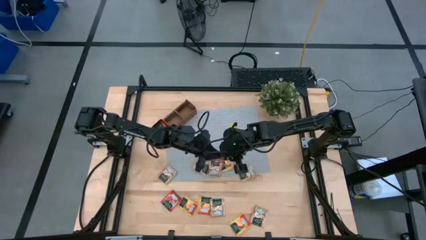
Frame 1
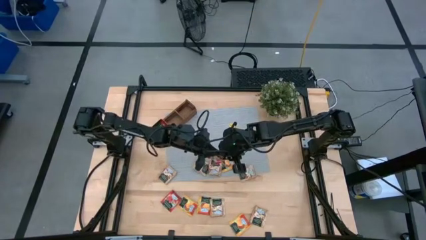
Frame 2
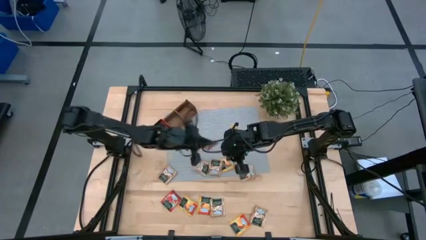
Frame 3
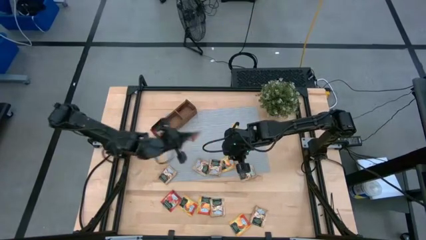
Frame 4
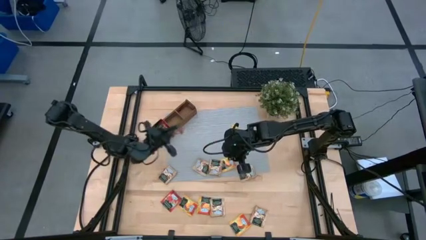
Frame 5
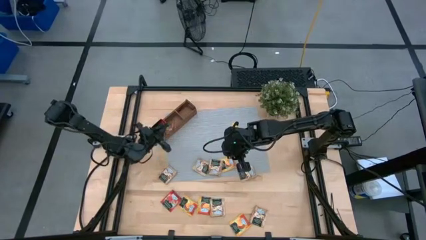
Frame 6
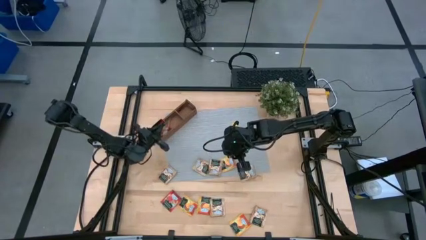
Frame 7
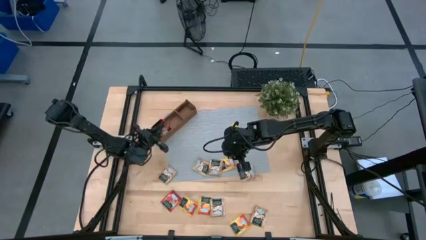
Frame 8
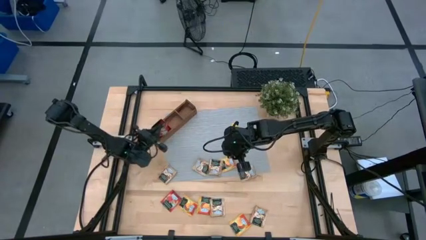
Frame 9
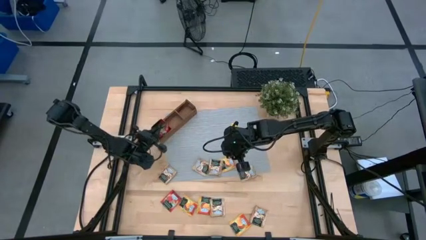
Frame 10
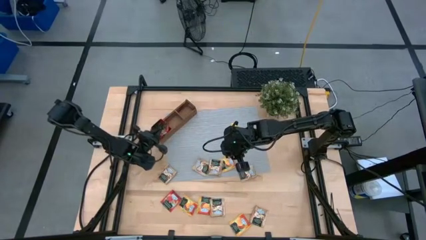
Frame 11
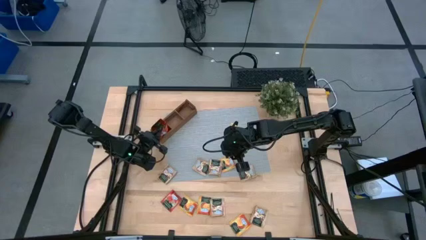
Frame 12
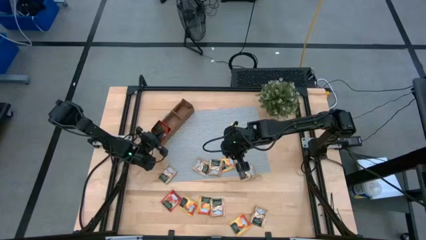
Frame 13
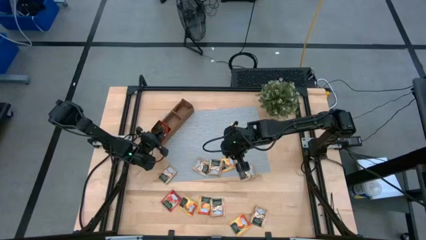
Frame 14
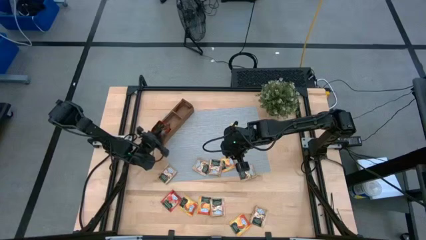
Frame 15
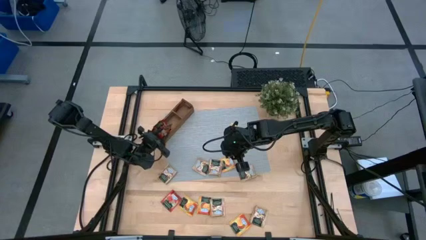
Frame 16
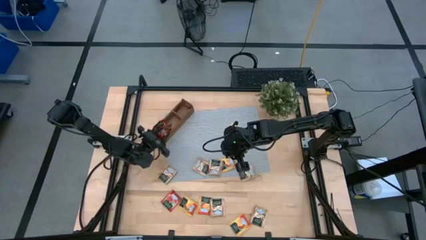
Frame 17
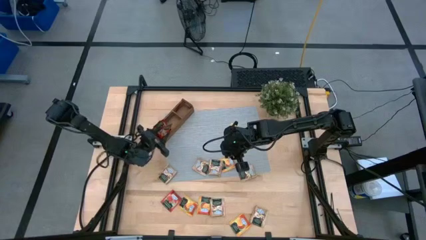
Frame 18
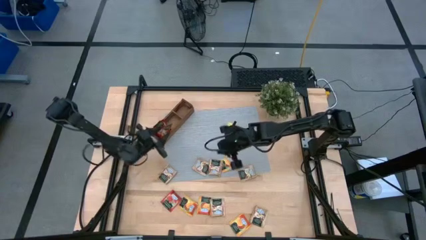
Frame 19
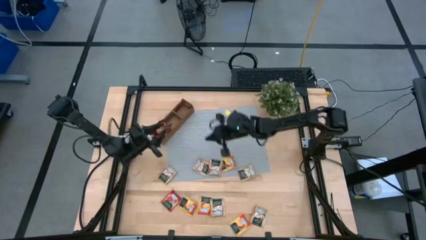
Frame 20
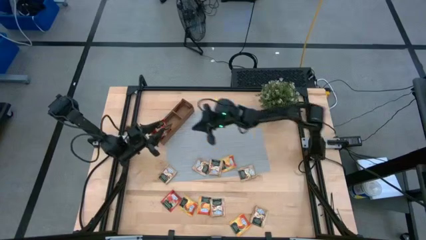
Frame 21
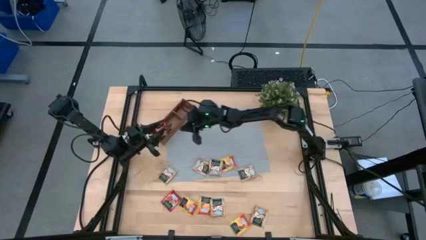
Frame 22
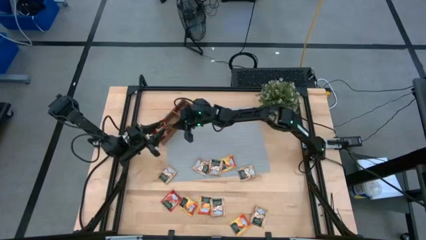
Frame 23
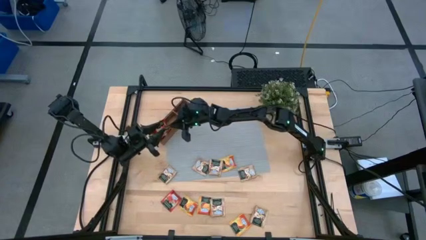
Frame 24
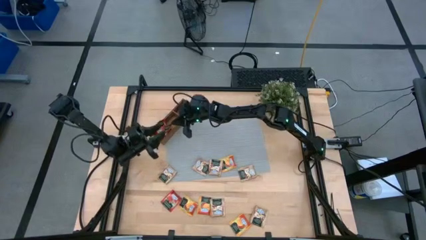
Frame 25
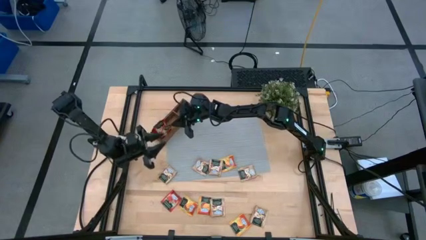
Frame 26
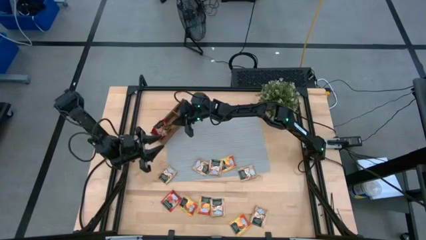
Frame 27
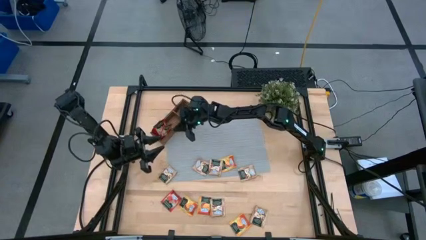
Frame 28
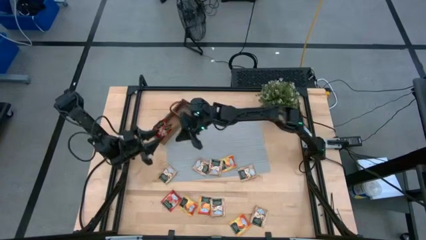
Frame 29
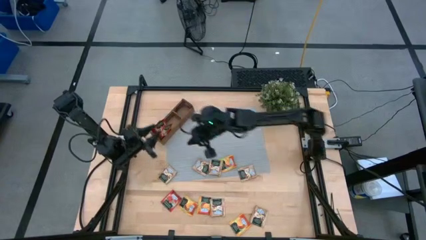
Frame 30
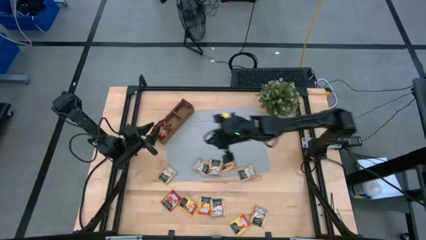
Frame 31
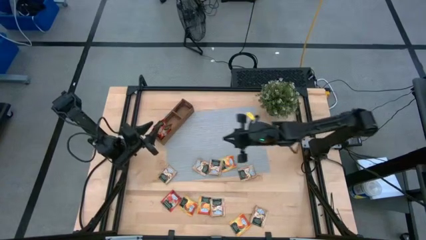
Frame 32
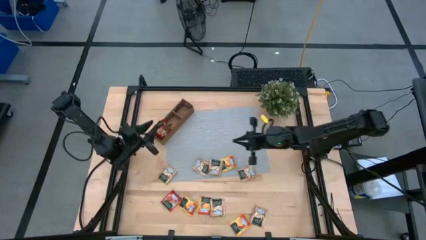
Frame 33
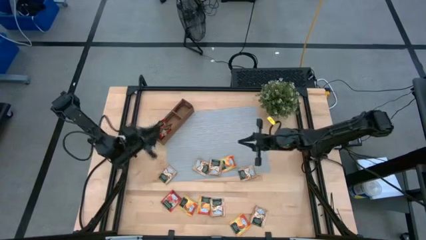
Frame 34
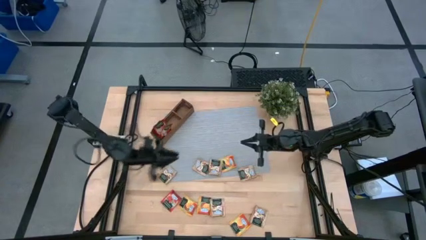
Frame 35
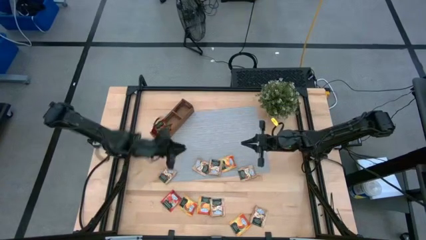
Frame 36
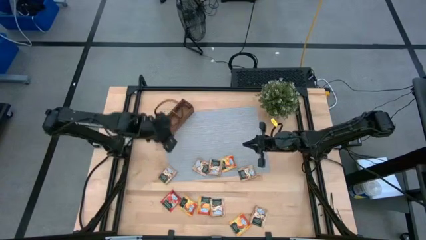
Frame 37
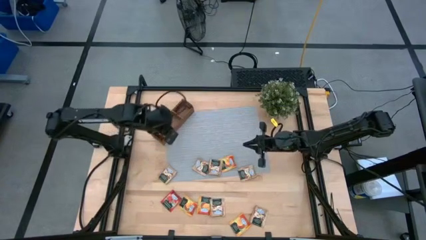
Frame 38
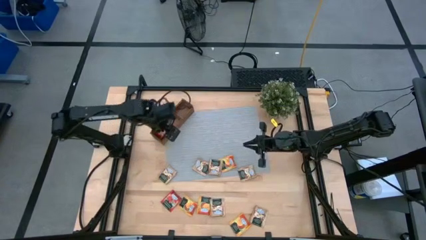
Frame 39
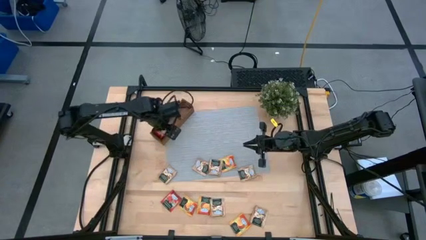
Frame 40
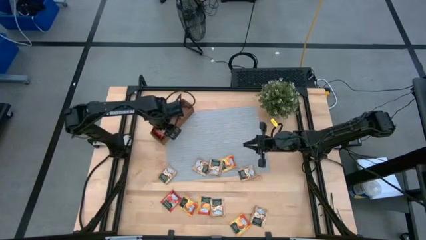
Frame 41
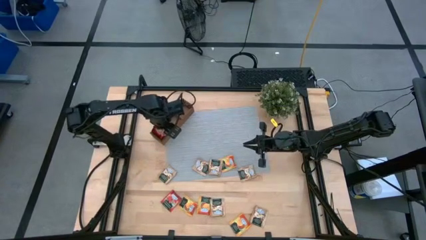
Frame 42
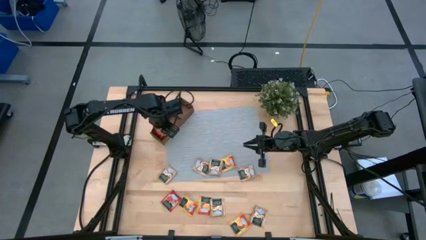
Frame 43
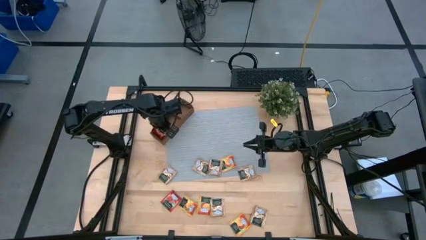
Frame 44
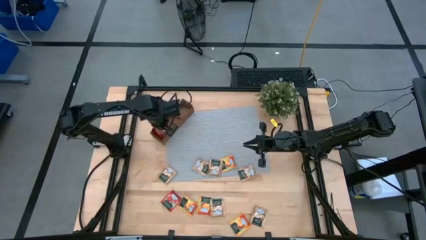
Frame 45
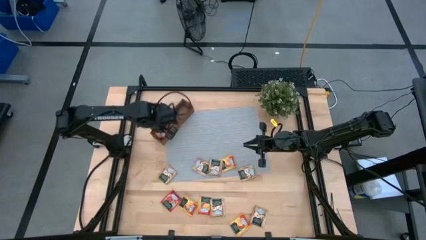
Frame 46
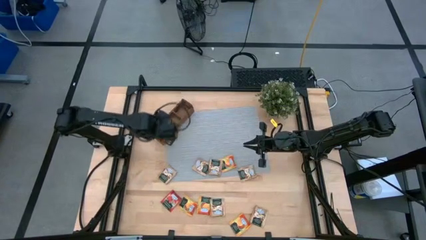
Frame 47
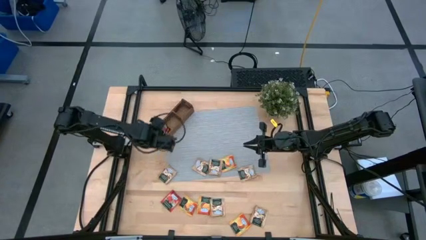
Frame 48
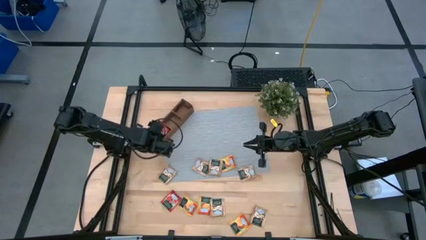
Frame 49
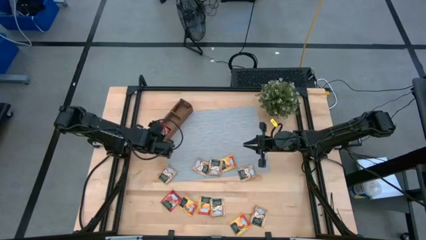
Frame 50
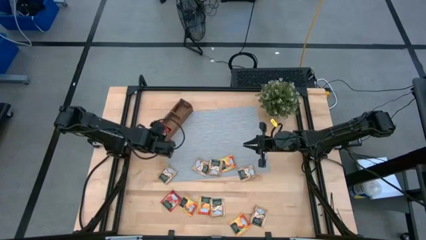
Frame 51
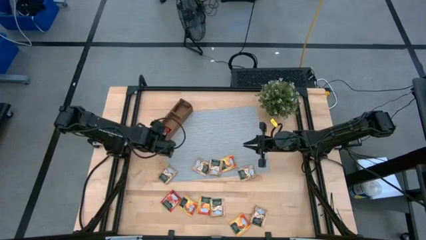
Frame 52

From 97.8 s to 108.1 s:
Task: Pick & Place Tea
Put the red tea bag into the left section of the wooden organizer

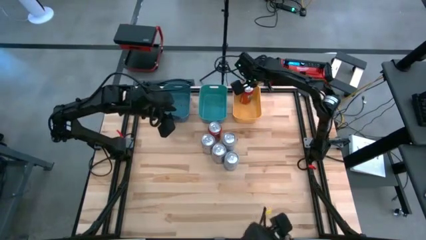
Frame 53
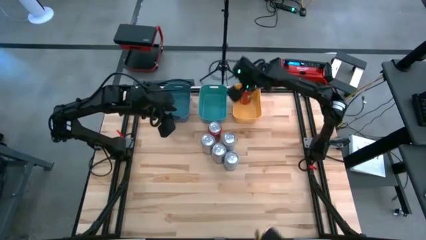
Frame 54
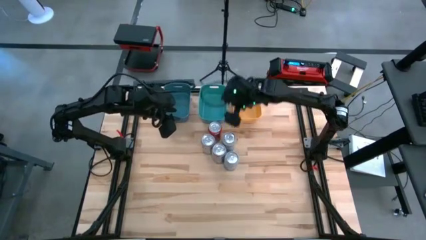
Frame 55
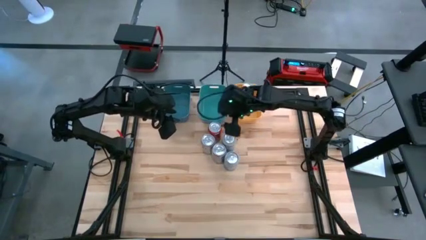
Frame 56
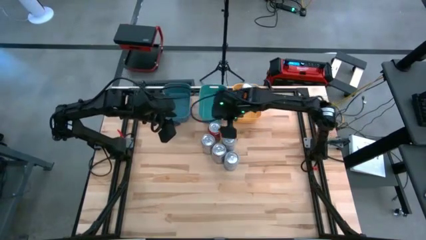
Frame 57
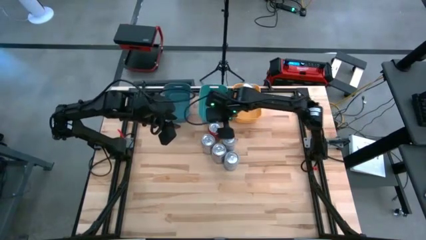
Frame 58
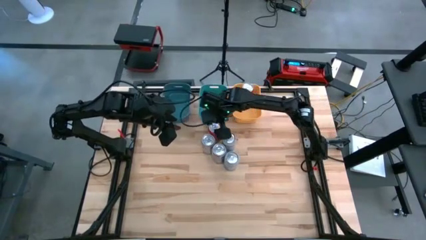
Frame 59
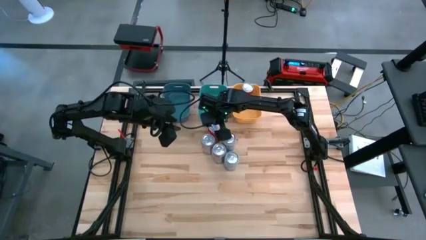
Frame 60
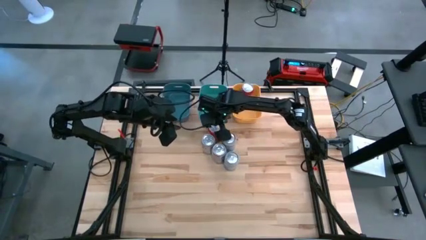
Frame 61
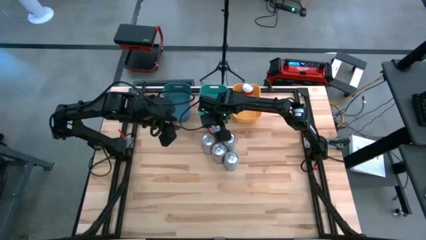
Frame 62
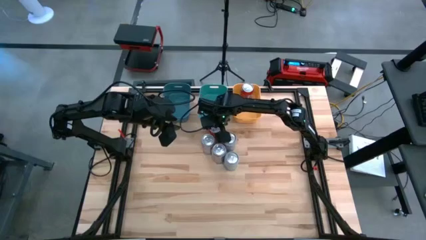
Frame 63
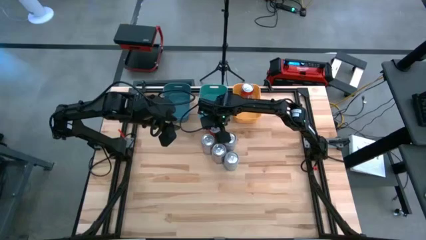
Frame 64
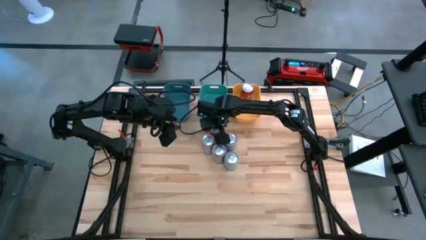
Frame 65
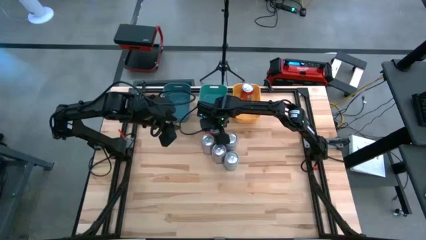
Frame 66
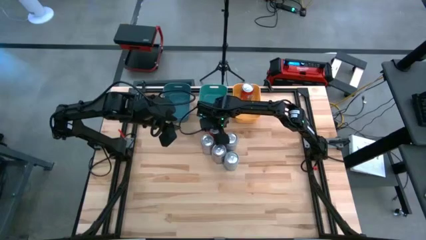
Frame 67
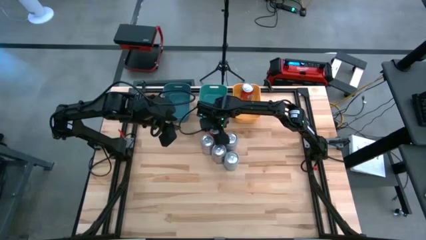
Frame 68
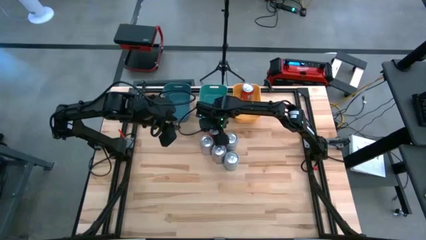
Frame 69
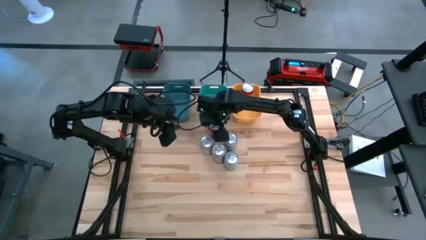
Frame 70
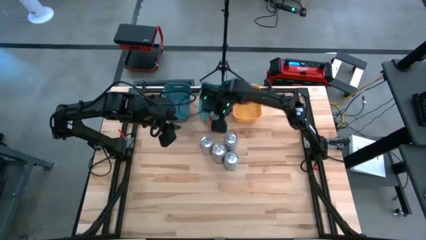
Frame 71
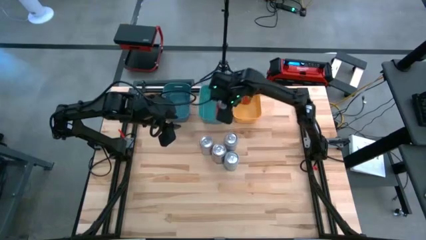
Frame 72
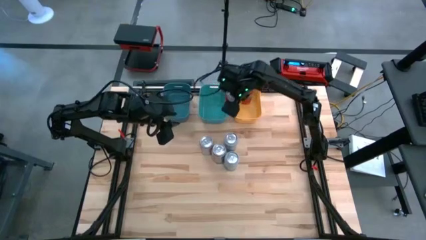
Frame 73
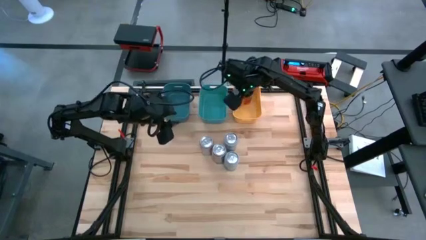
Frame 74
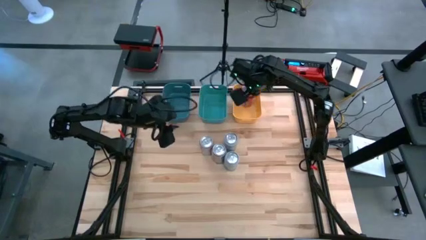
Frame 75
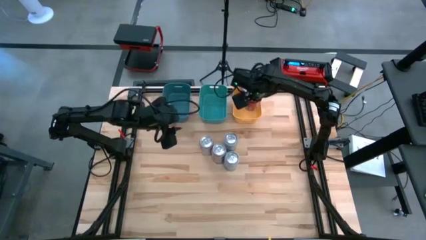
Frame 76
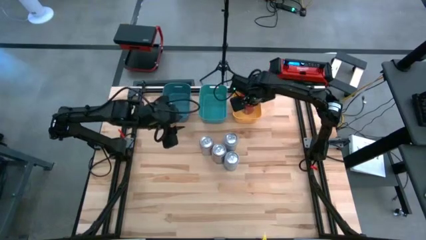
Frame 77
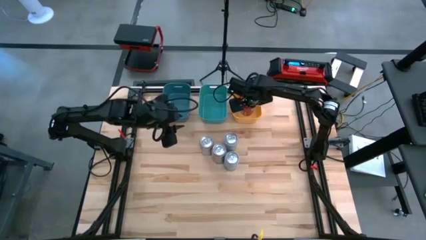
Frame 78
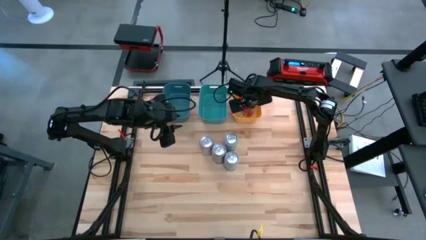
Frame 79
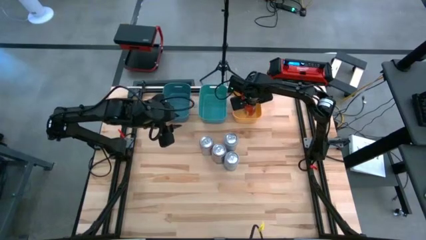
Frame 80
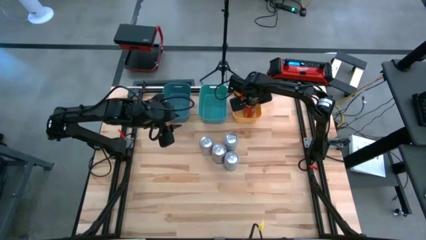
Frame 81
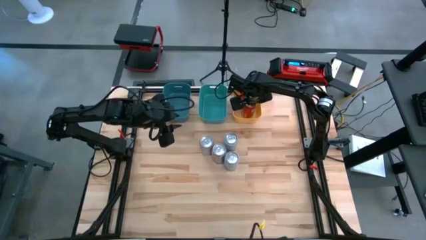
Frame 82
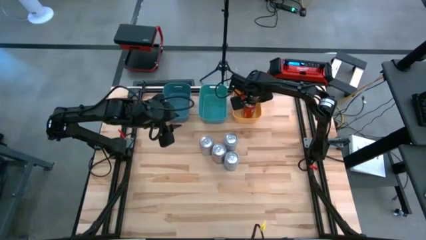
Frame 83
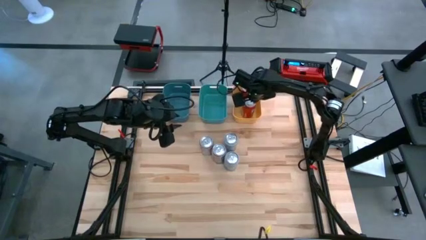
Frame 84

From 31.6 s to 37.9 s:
Task: Sort soda cans
Put the red soda can into the yellow bin
